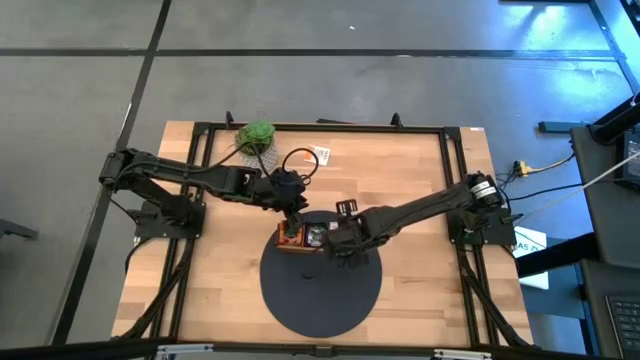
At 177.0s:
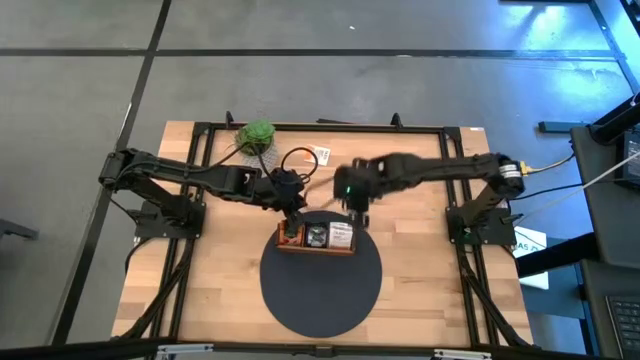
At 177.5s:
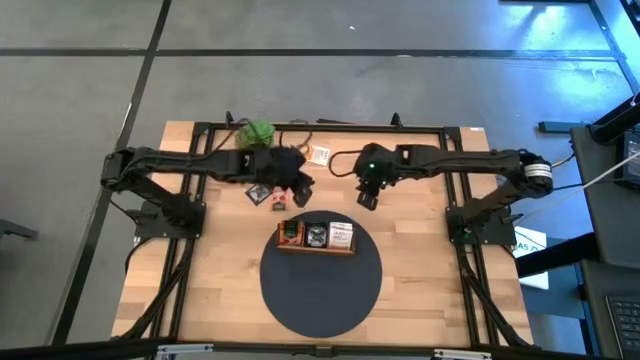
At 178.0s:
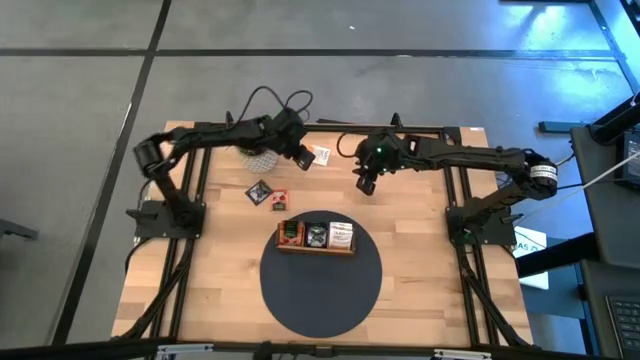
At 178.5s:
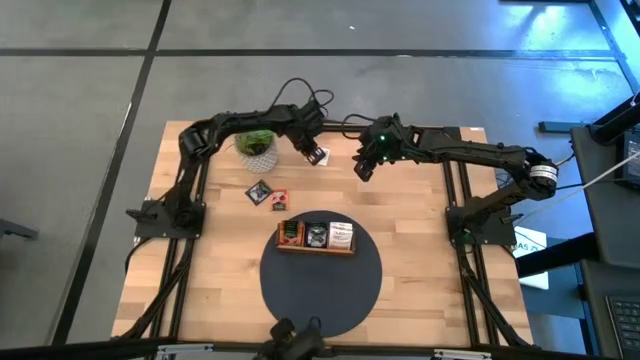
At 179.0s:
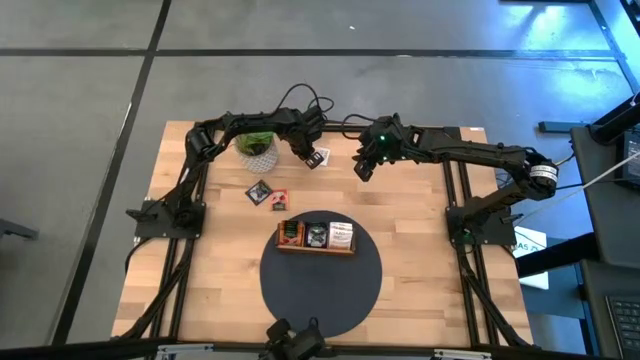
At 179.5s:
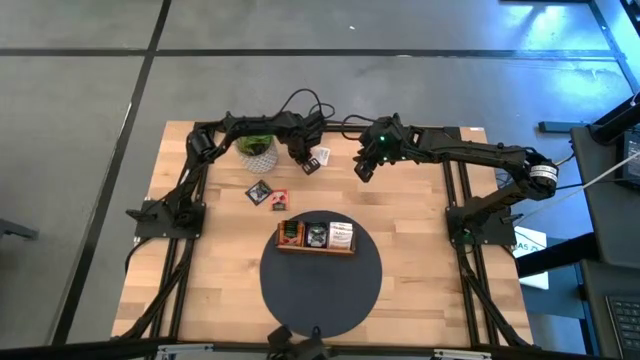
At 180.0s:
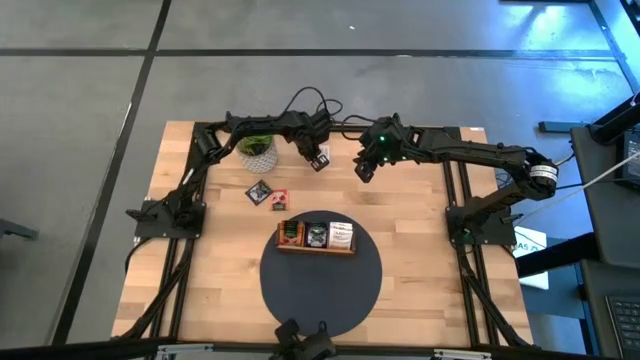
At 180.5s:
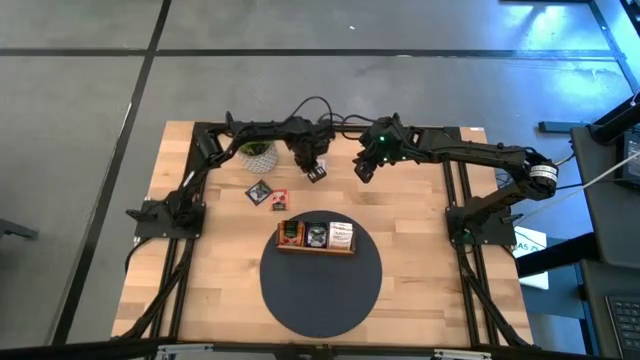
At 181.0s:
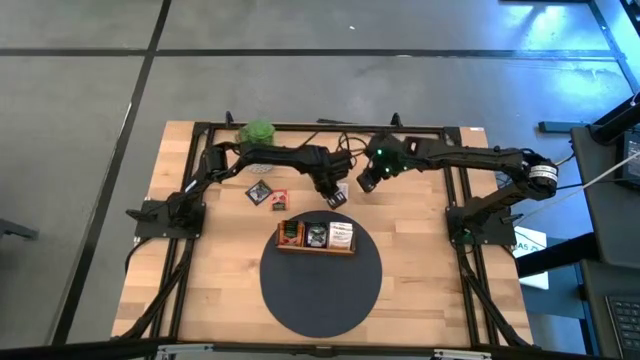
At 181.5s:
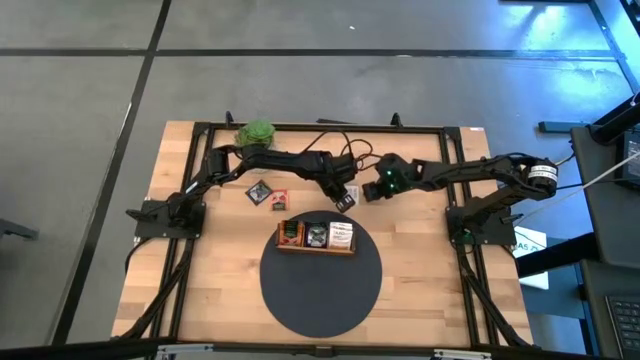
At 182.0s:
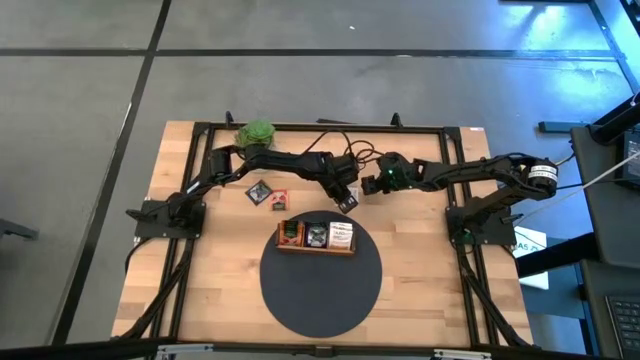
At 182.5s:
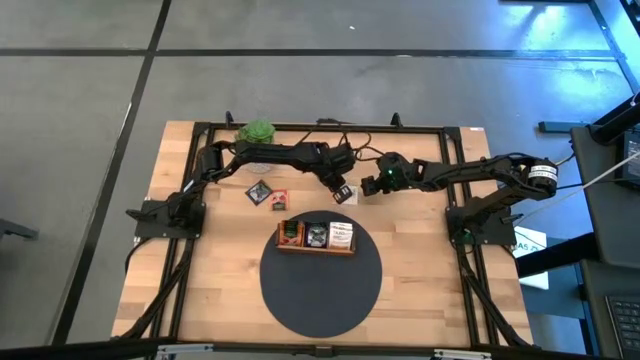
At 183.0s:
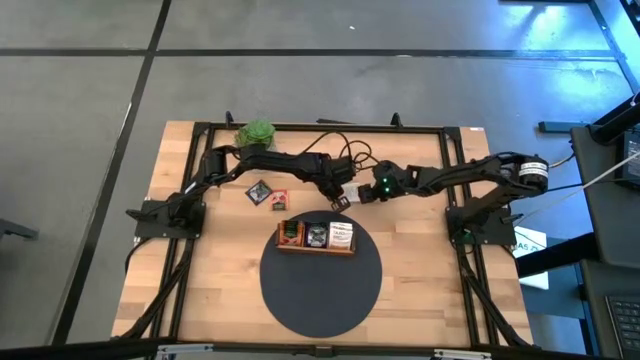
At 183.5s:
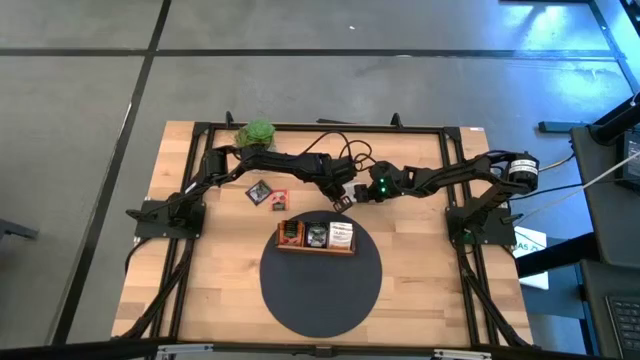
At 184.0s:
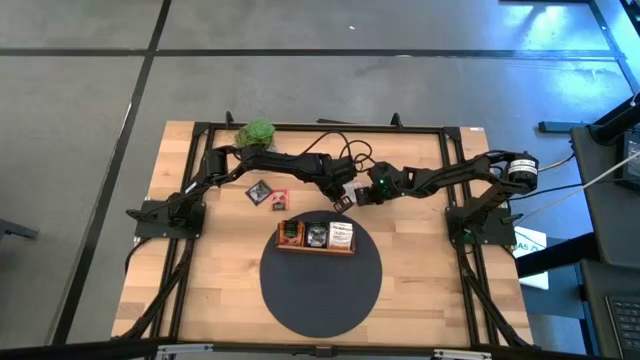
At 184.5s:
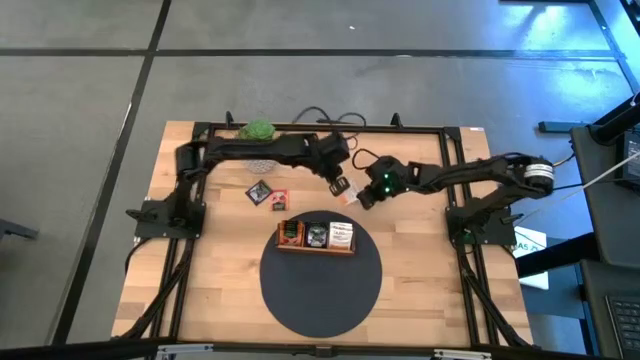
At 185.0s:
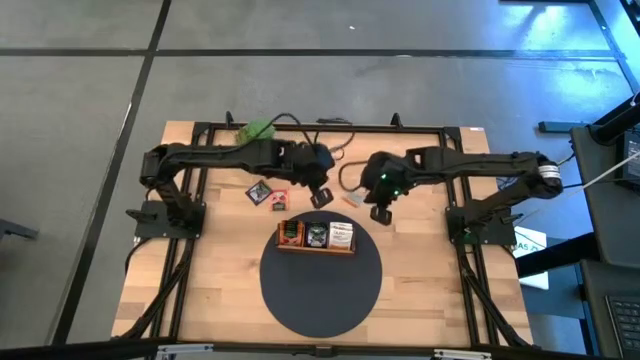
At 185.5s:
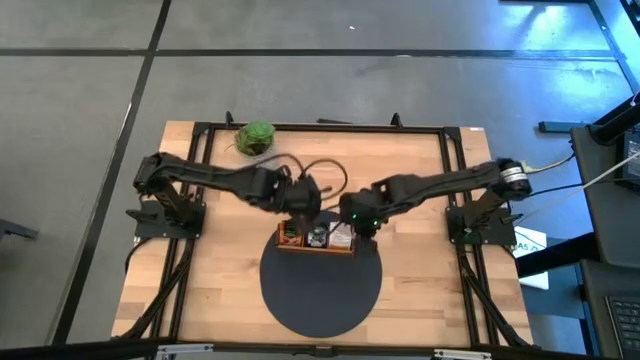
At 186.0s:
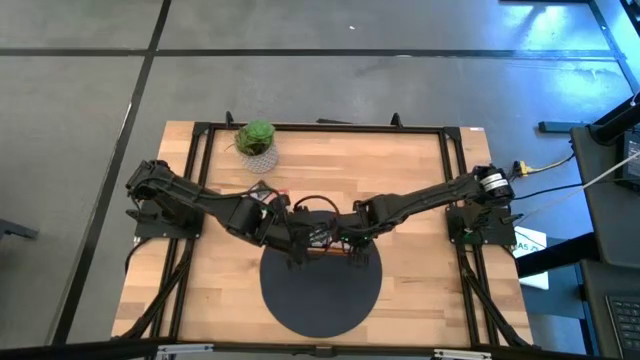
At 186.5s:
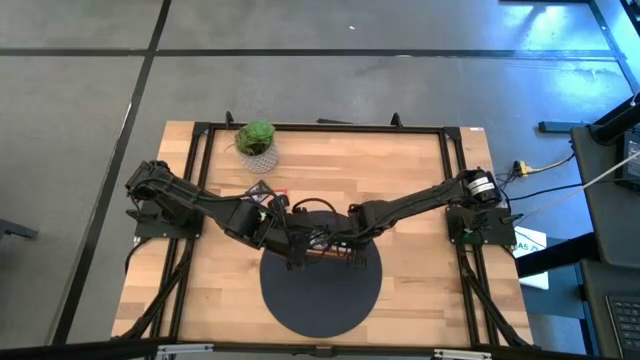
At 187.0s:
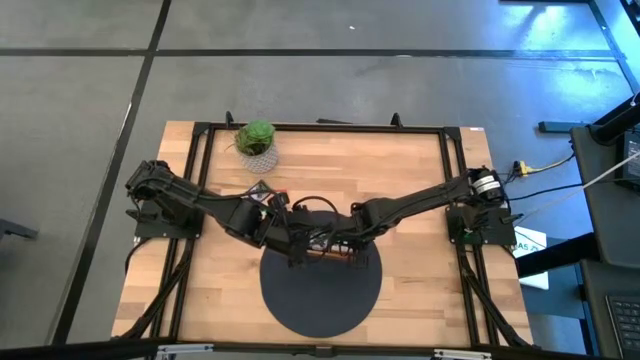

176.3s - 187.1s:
Task: Pick & Place Tea
Put the white tea bag into the right slot of the wooden organizer

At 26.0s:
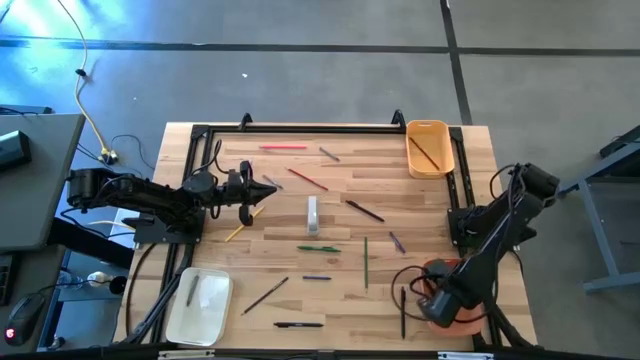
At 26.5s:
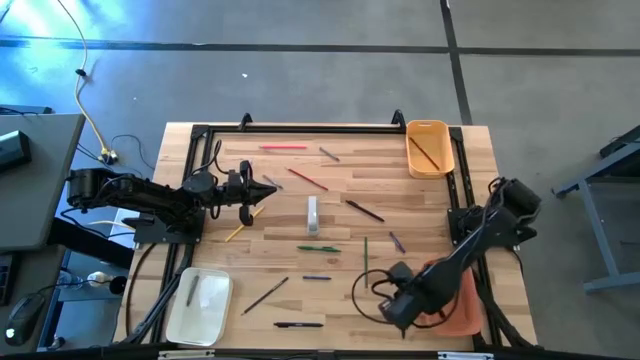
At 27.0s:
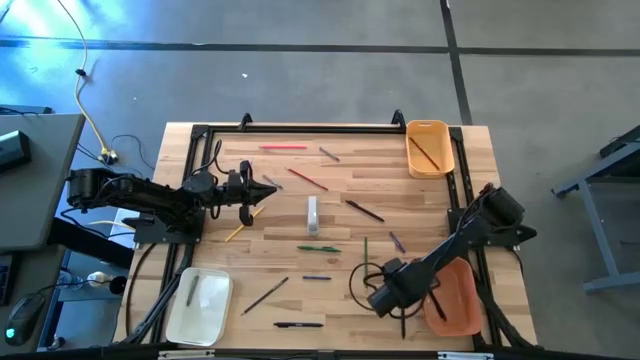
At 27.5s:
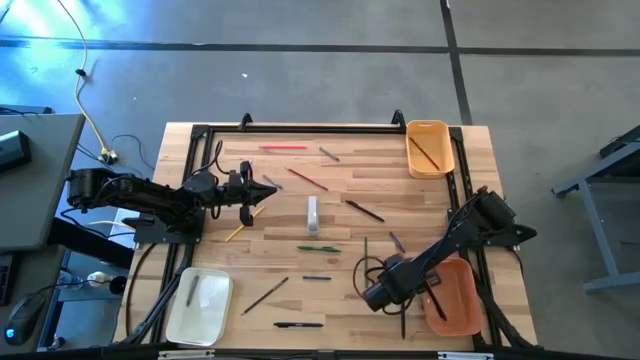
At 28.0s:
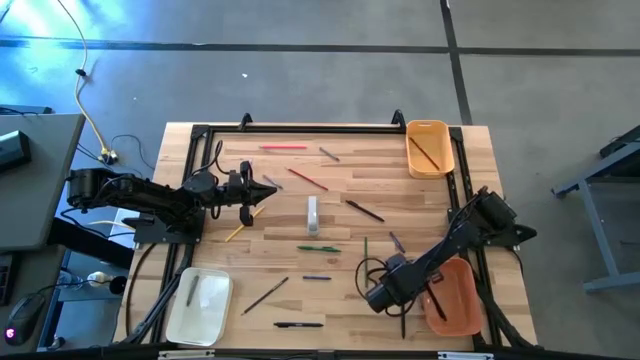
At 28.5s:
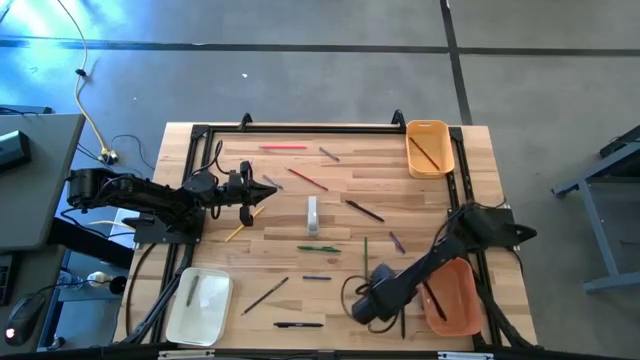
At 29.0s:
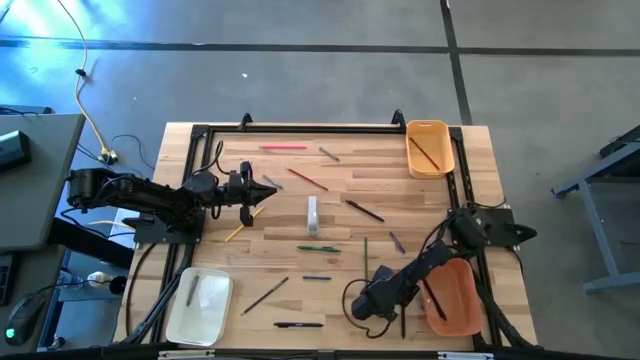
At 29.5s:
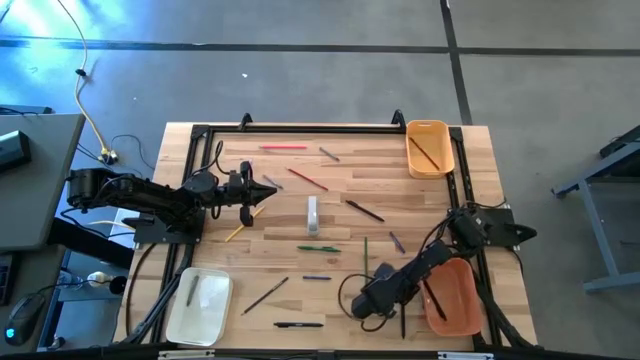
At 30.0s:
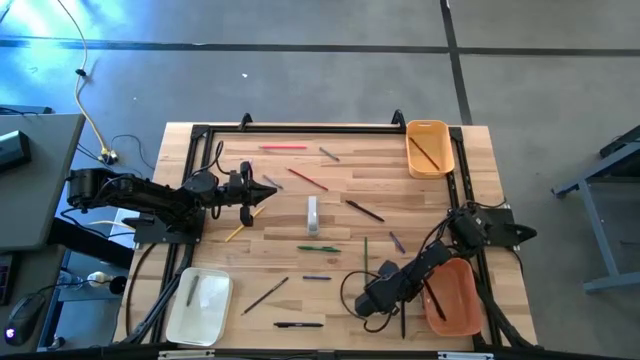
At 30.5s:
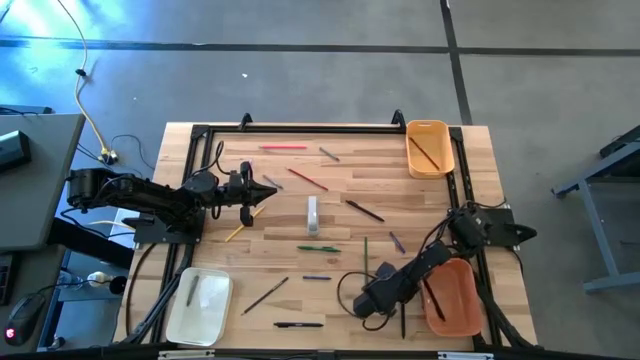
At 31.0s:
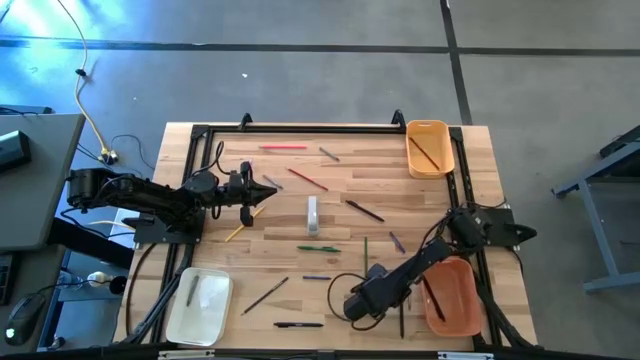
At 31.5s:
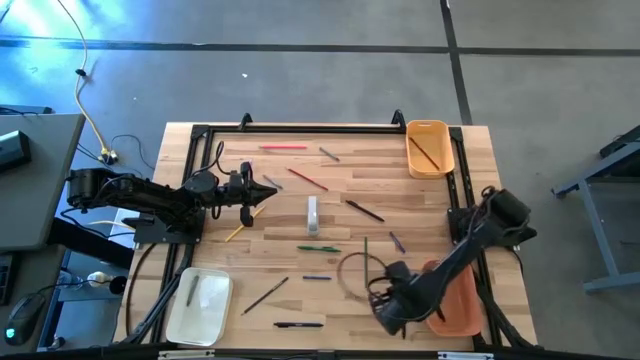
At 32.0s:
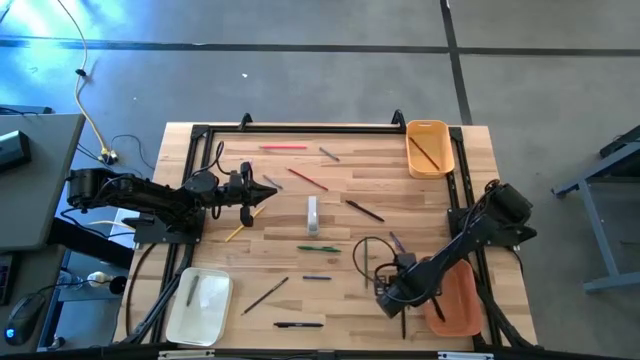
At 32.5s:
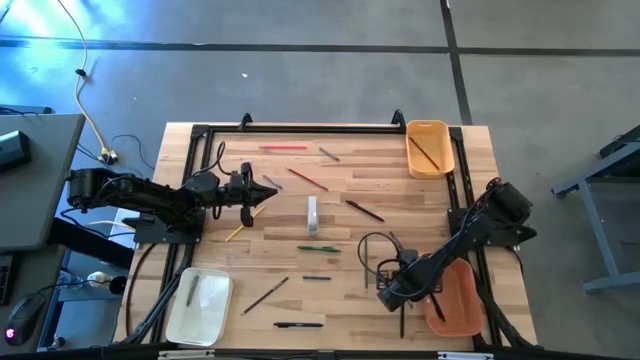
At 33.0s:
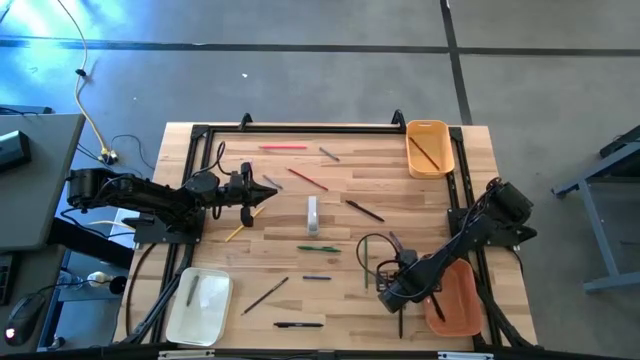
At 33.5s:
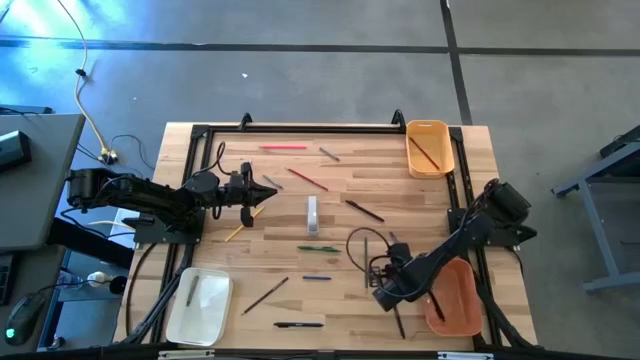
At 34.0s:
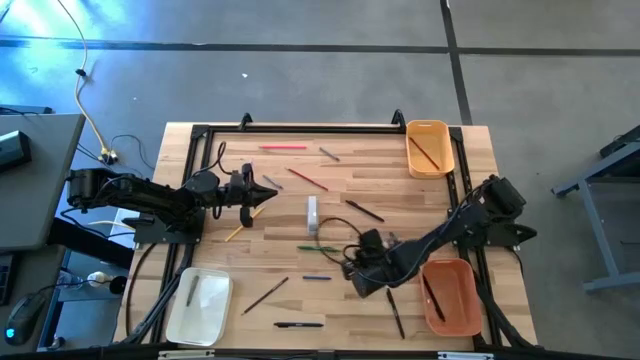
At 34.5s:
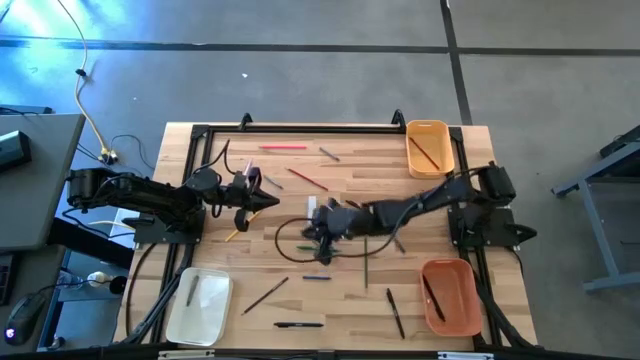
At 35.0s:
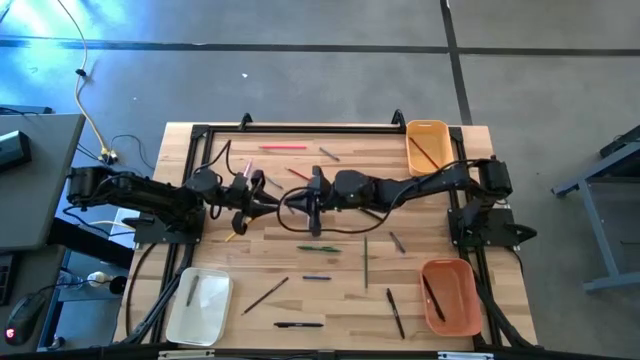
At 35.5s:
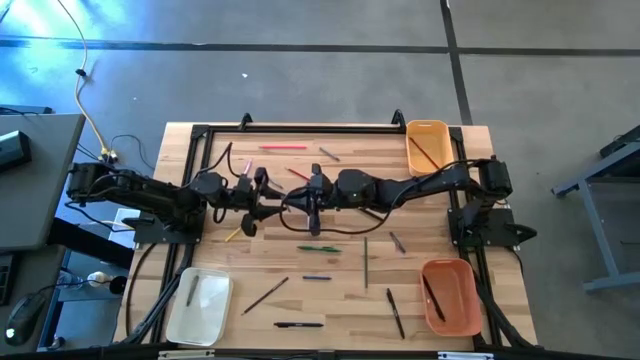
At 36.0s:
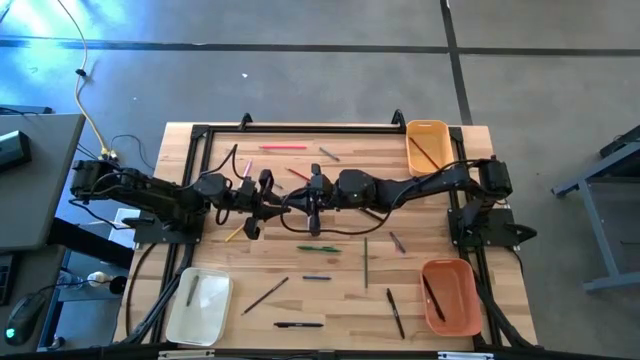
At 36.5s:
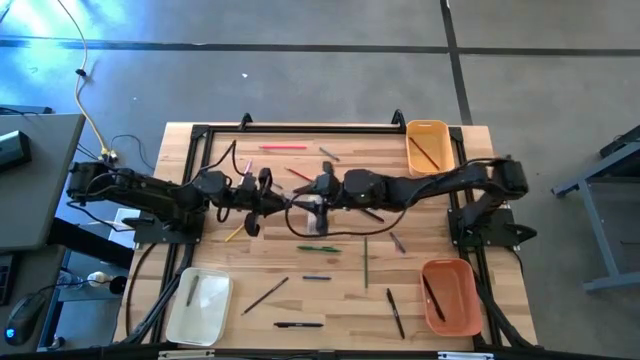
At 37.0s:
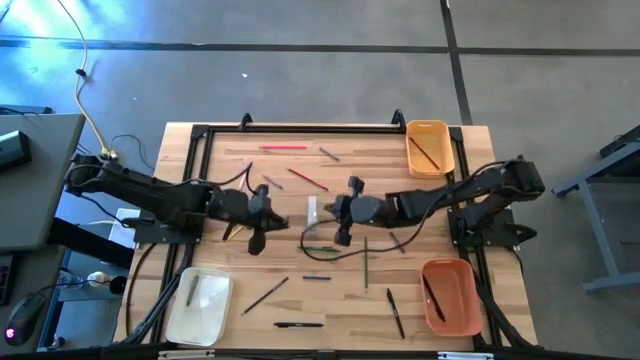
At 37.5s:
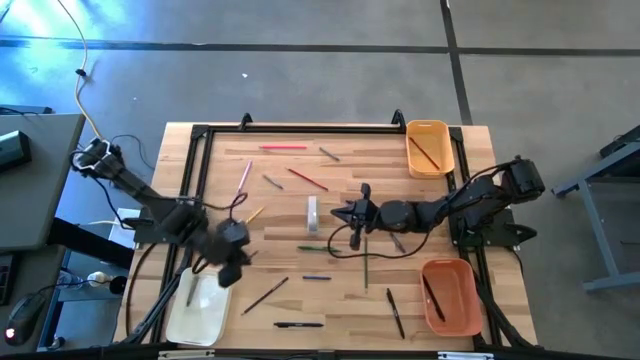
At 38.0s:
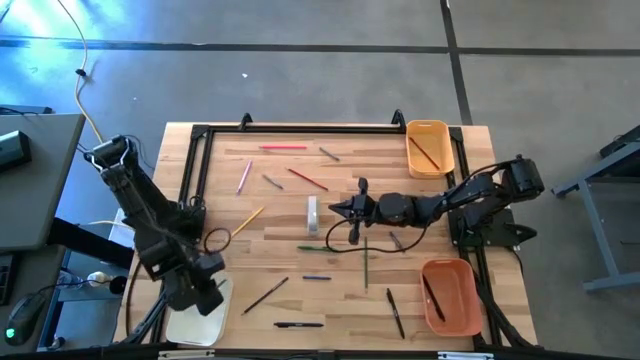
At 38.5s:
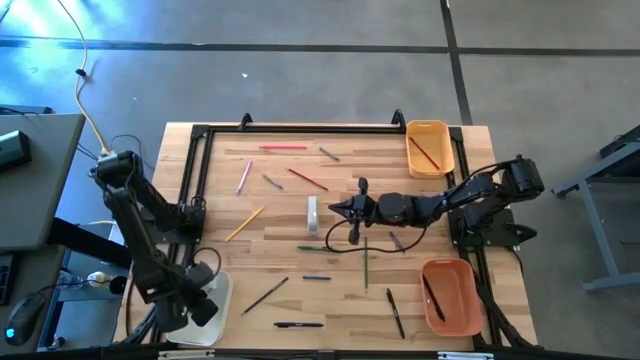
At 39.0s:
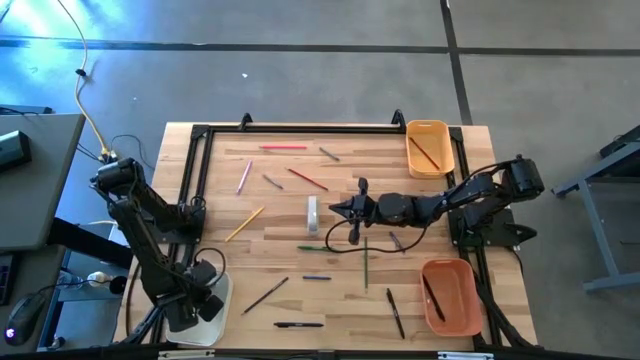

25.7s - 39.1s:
Task: Sort crayons/erasers/pens/pencils in bins
Put the gray crayon into the white bin
